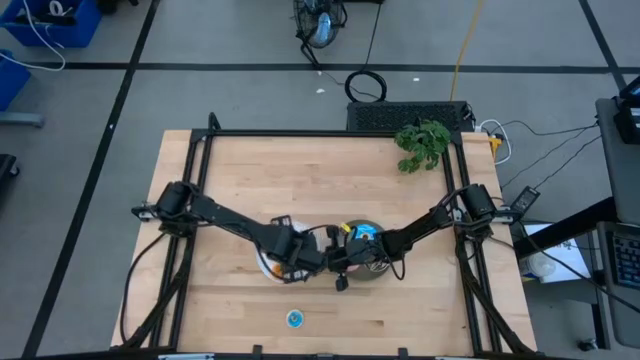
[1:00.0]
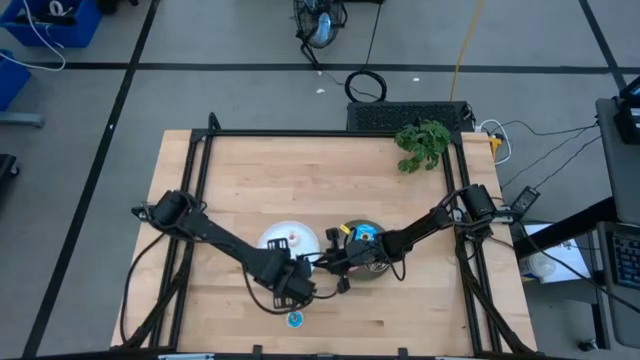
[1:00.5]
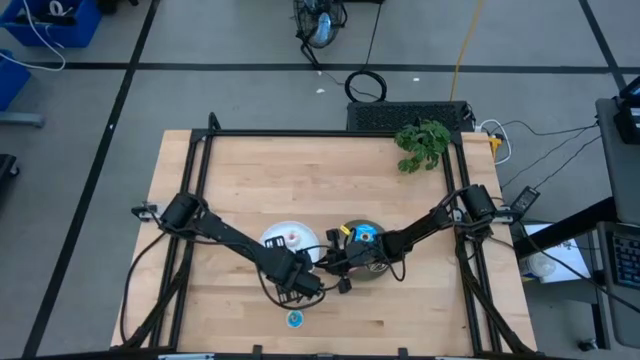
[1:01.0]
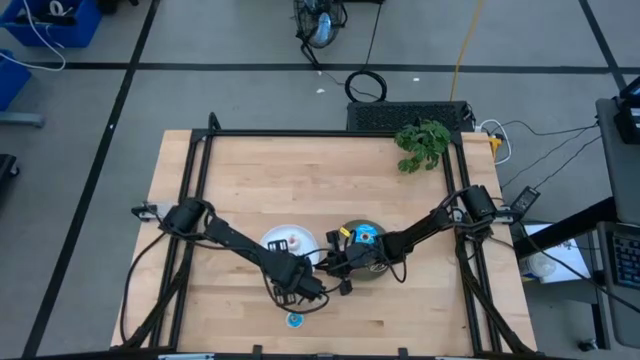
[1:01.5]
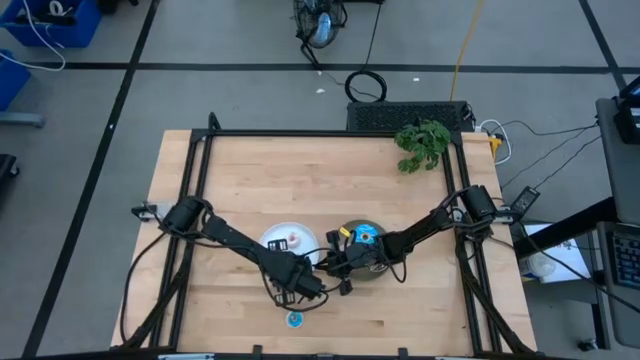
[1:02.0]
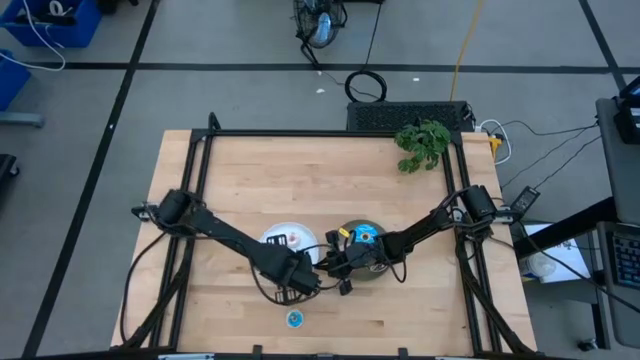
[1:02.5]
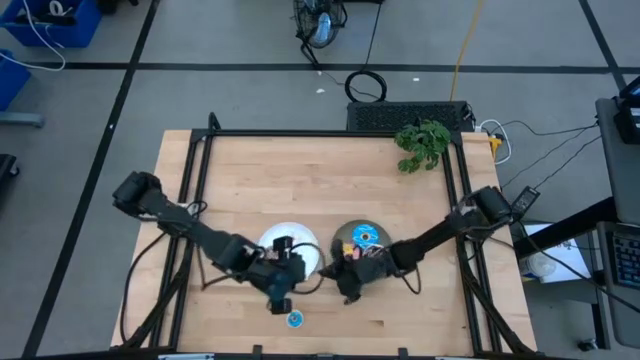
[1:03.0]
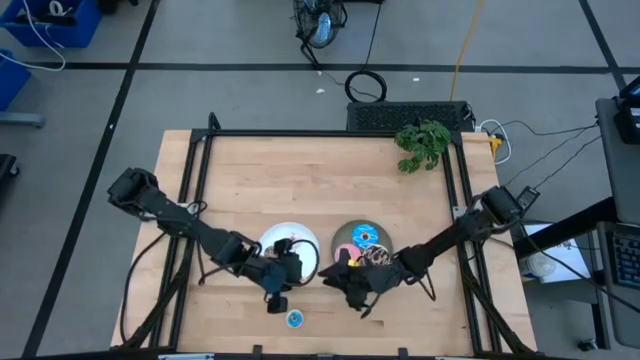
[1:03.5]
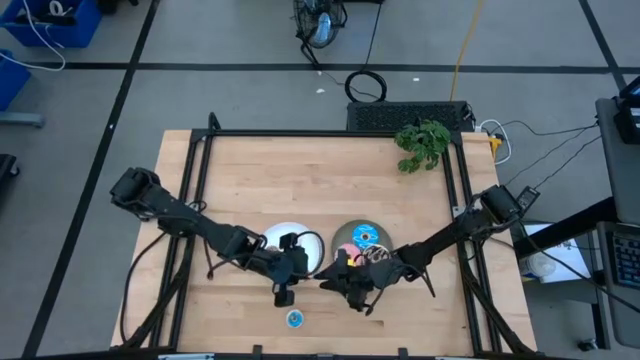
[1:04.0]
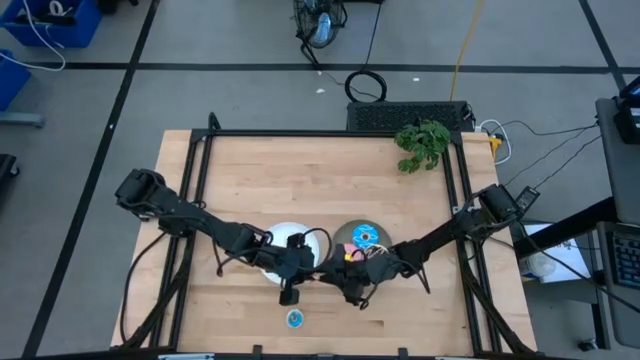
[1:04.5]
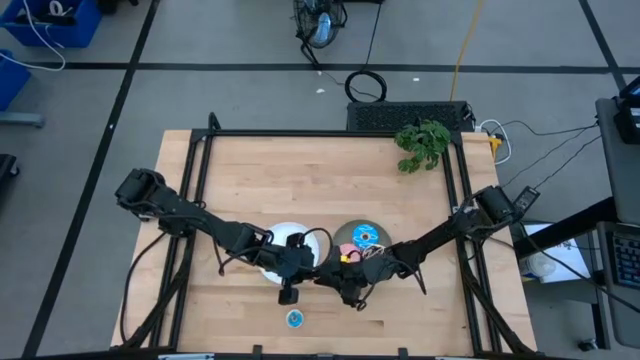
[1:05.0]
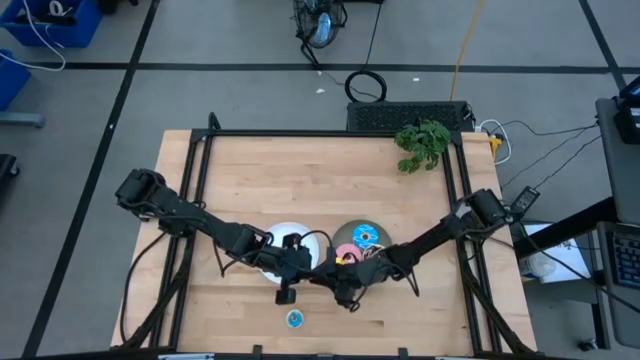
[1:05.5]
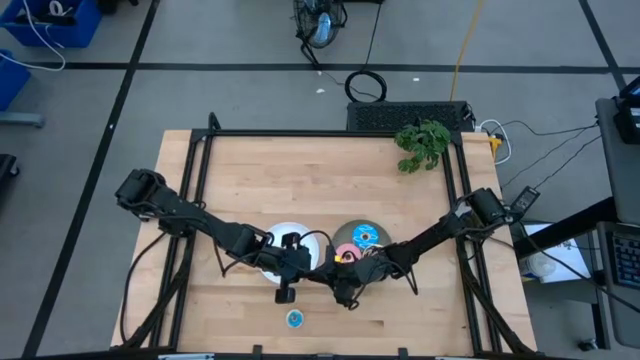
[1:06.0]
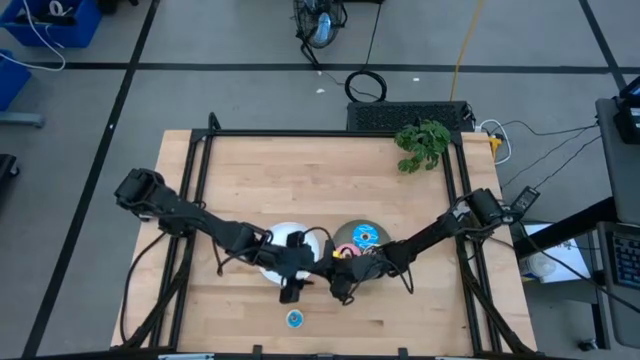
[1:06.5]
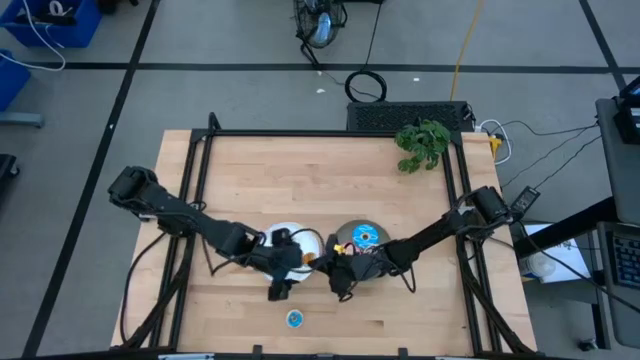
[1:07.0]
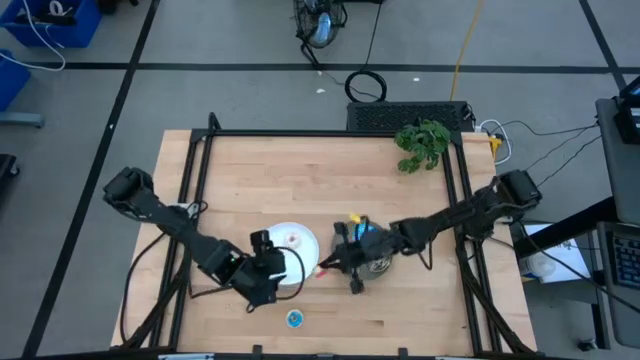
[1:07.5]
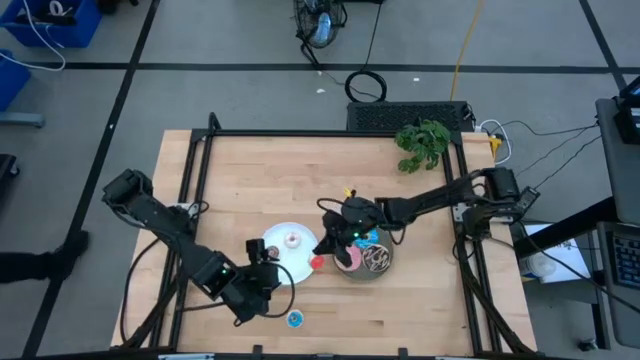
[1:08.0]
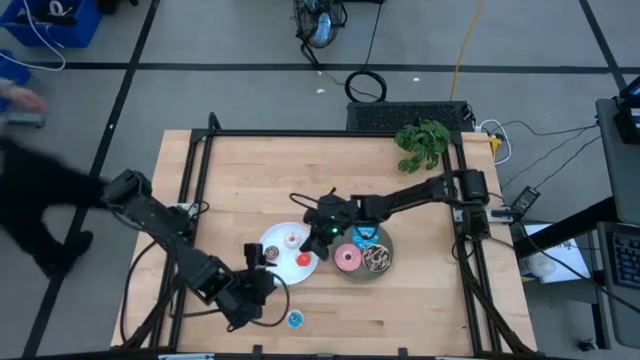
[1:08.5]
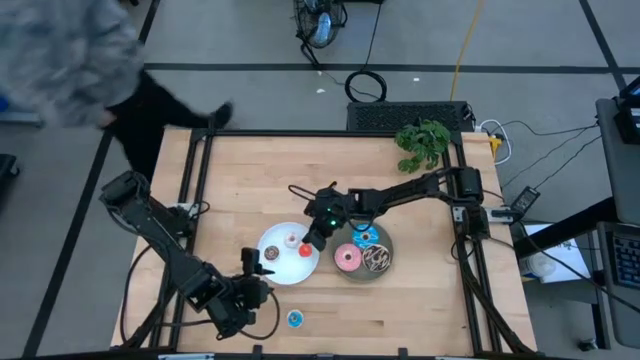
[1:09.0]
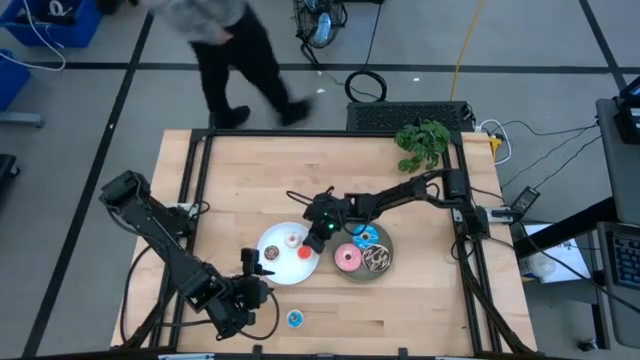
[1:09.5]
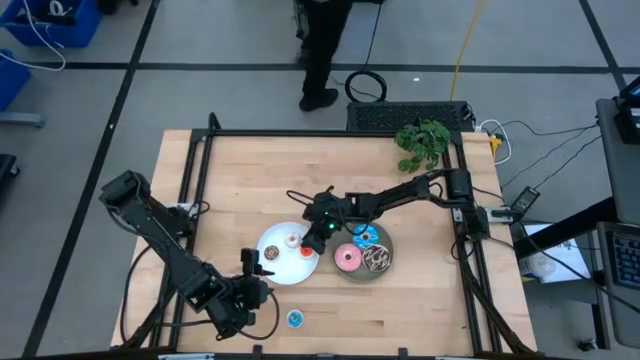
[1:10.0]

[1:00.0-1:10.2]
Task: Pick & Place donuts
Put the small red donut on the white plate

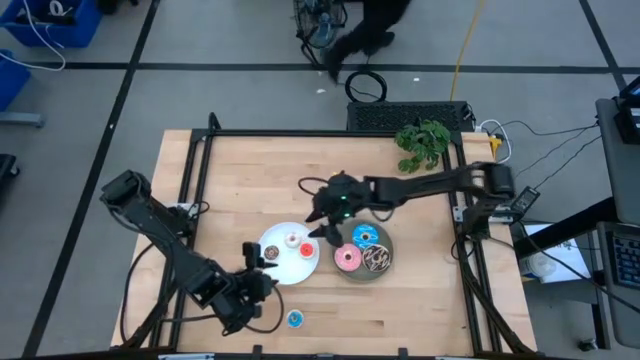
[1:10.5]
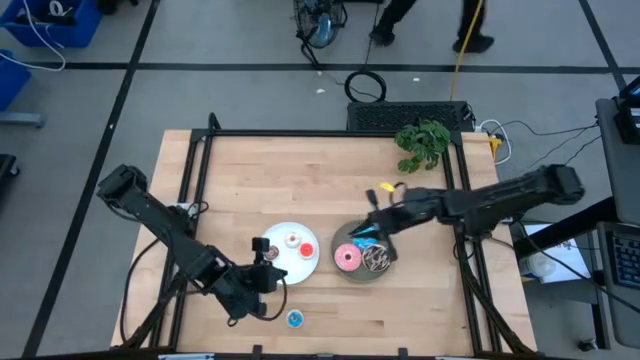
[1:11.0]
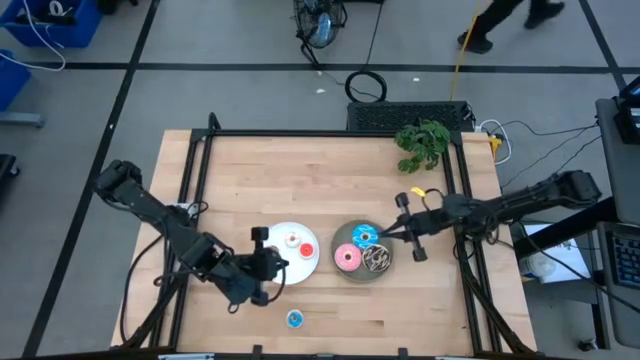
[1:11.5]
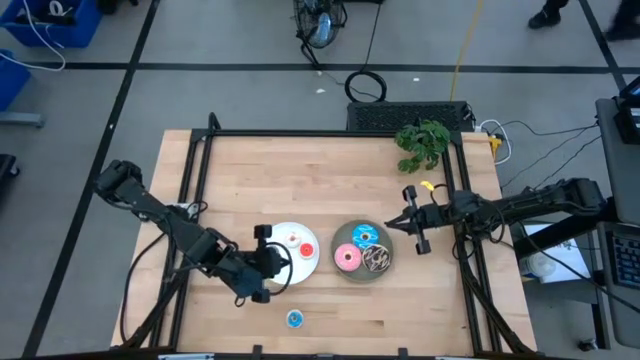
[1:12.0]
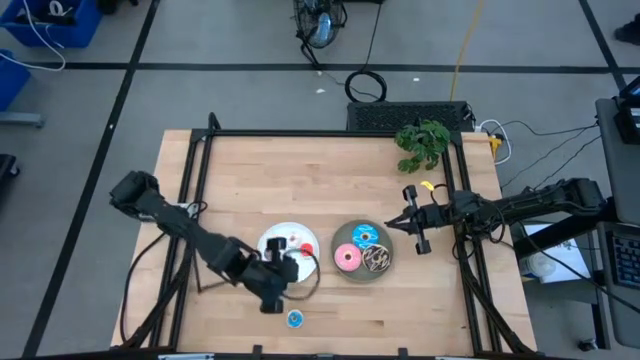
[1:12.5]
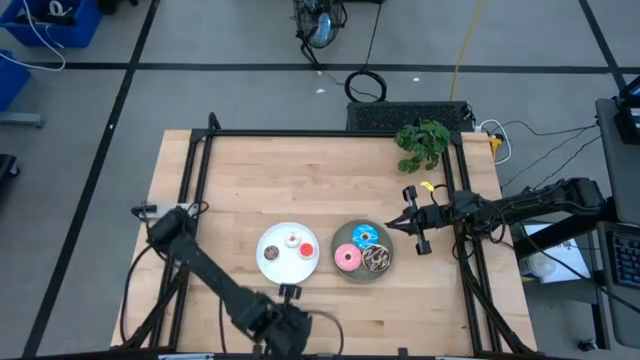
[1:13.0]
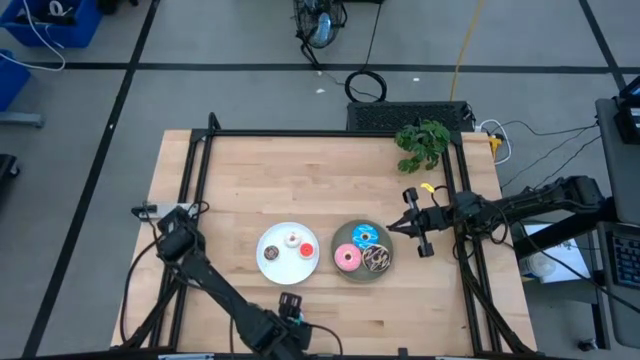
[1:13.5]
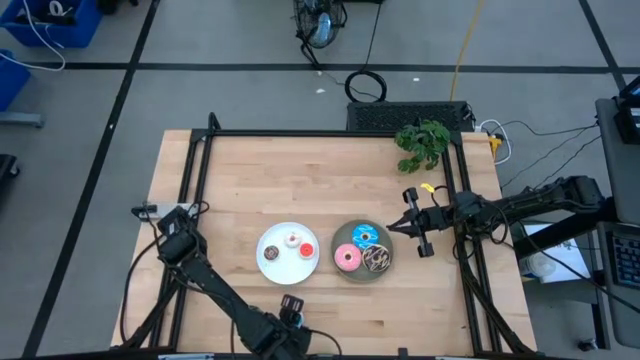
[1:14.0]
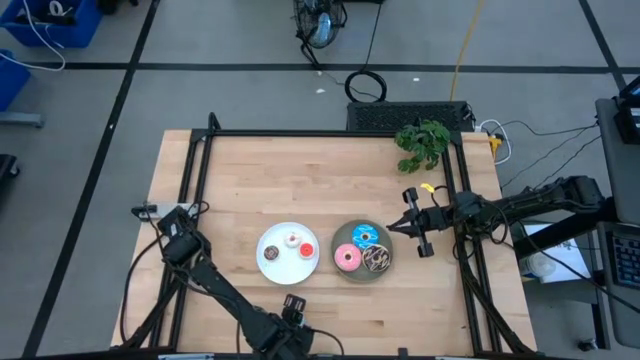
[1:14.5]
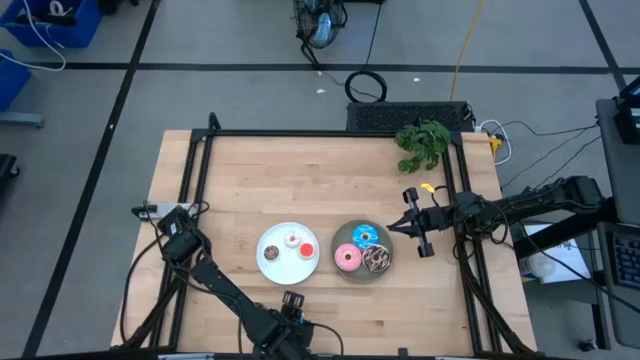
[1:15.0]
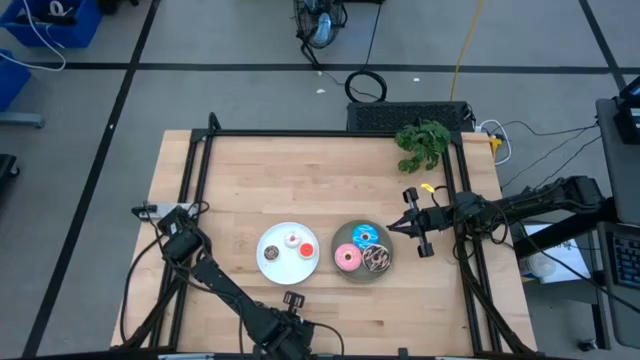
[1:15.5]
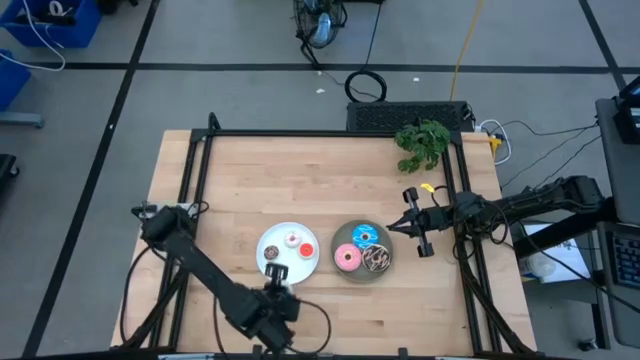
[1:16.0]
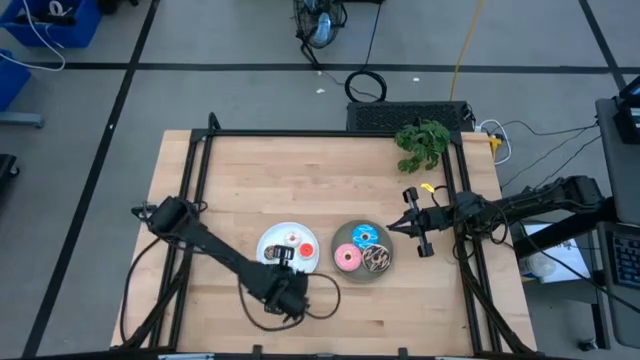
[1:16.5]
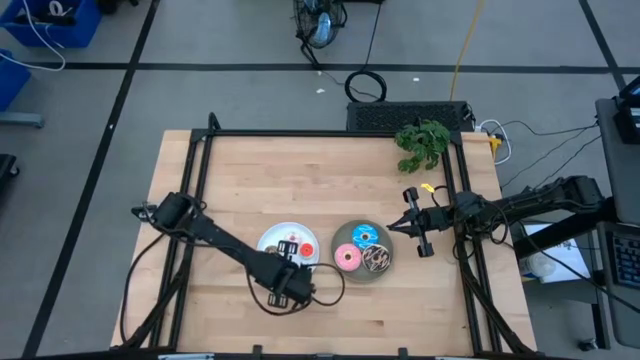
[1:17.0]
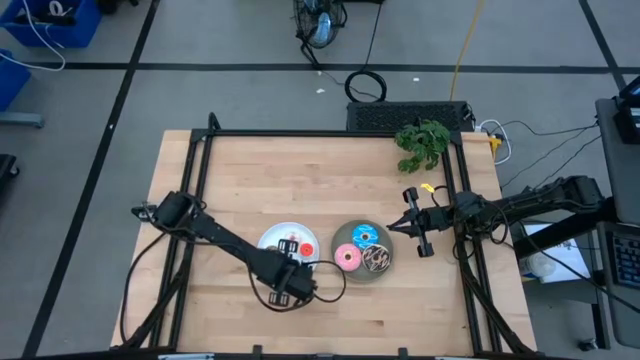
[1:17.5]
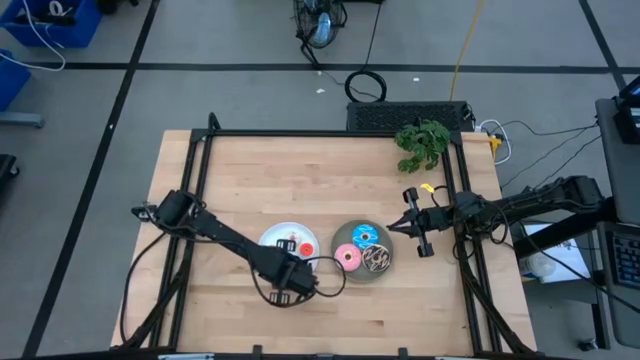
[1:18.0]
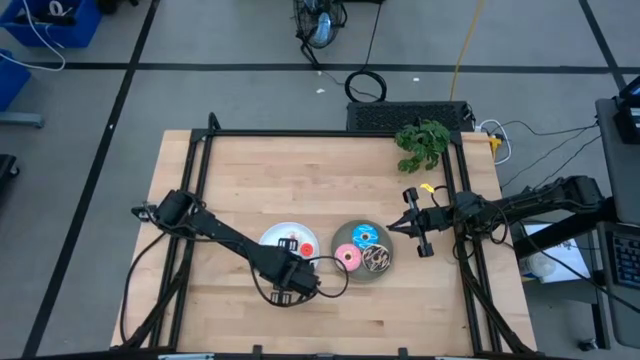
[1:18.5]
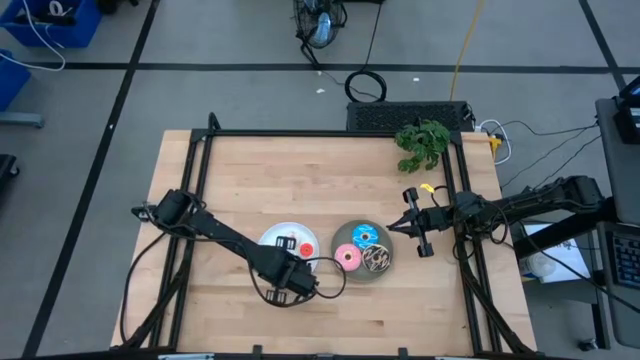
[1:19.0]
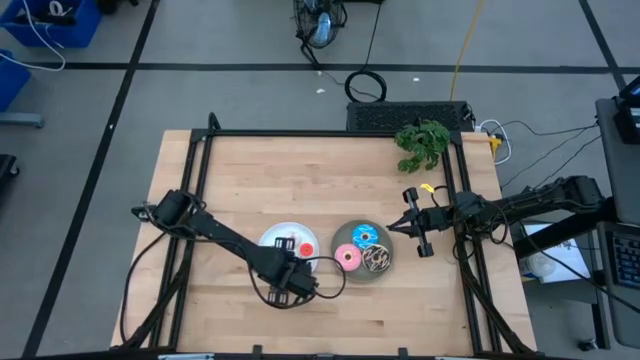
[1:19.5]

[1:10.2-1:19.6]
Put the small blue donut on the white plate
